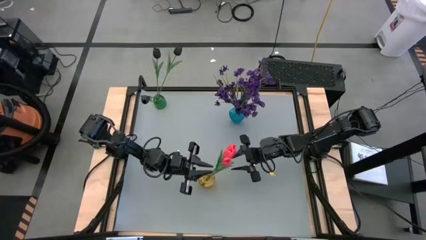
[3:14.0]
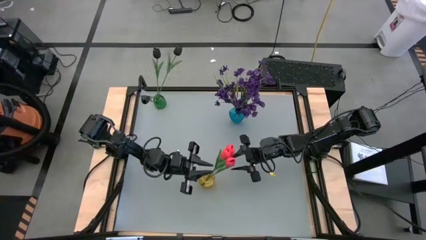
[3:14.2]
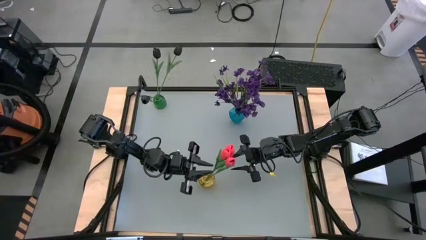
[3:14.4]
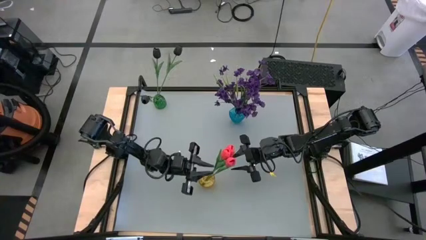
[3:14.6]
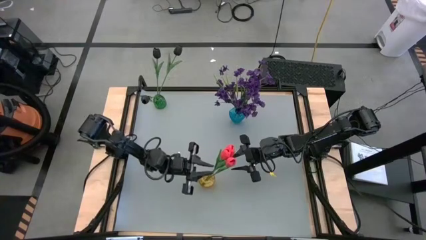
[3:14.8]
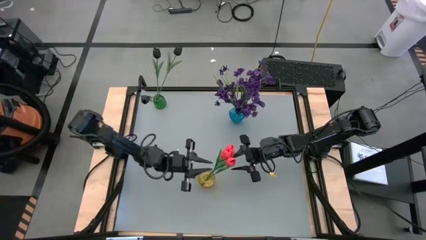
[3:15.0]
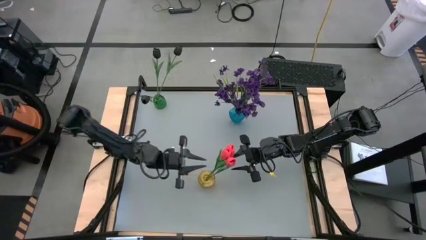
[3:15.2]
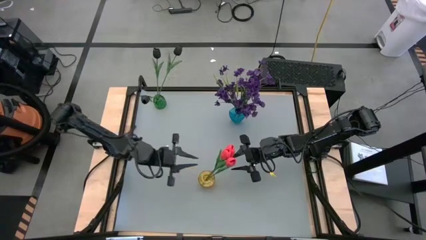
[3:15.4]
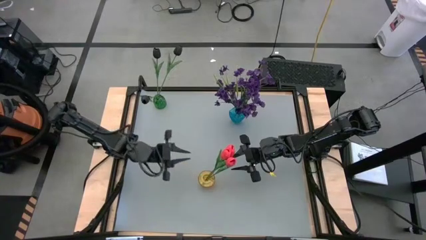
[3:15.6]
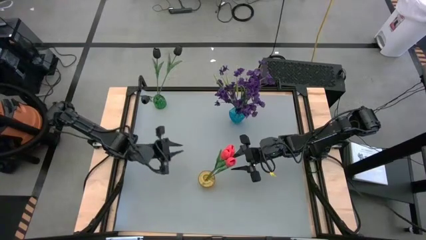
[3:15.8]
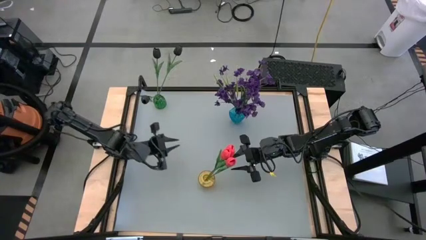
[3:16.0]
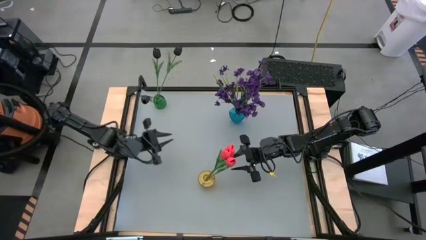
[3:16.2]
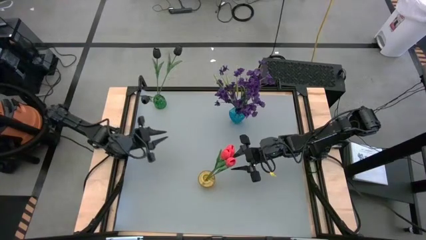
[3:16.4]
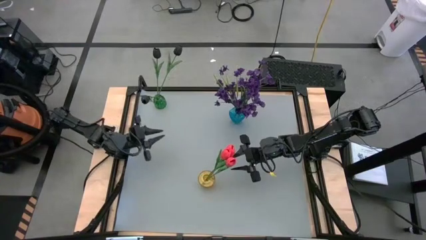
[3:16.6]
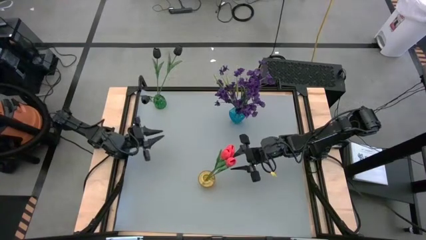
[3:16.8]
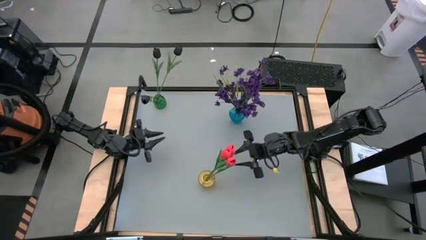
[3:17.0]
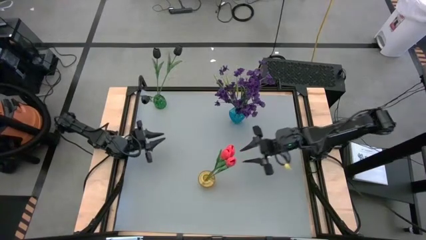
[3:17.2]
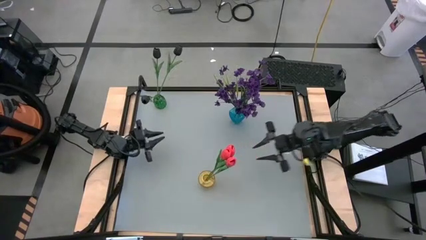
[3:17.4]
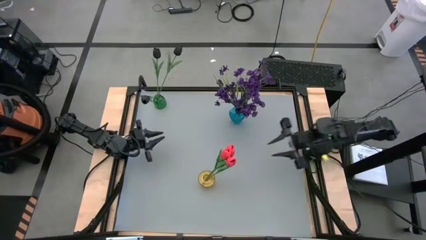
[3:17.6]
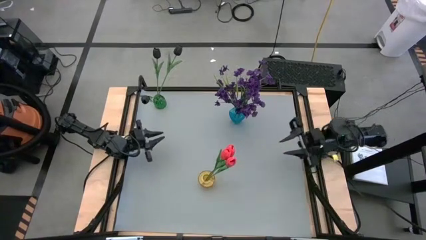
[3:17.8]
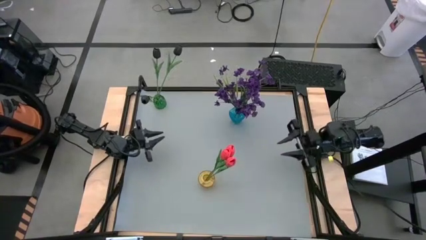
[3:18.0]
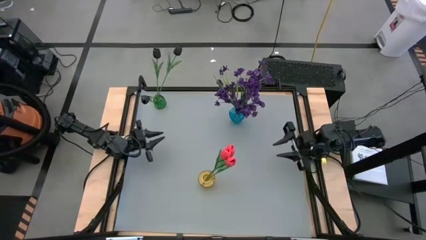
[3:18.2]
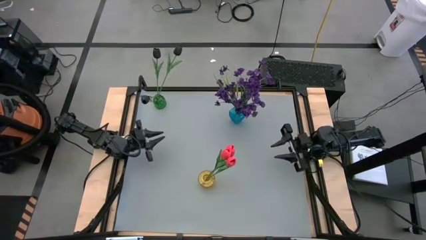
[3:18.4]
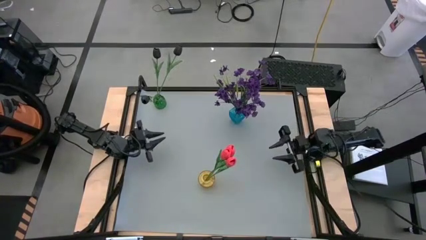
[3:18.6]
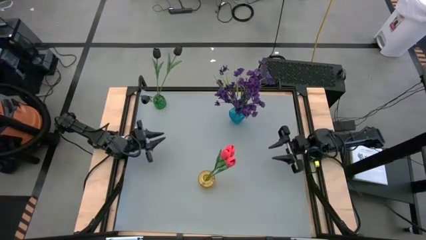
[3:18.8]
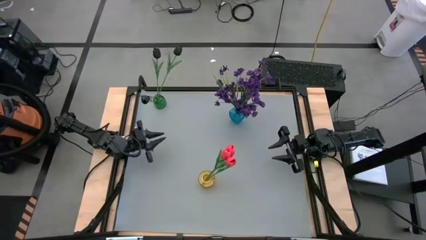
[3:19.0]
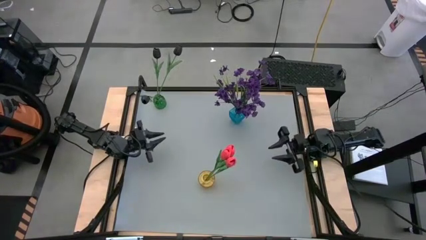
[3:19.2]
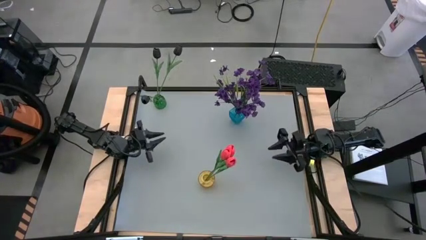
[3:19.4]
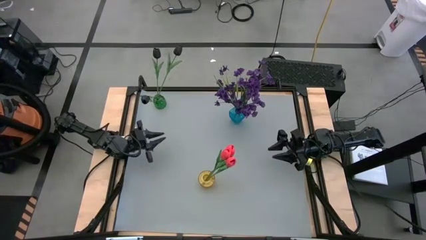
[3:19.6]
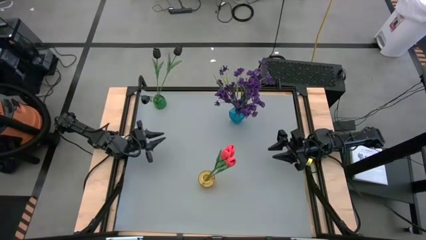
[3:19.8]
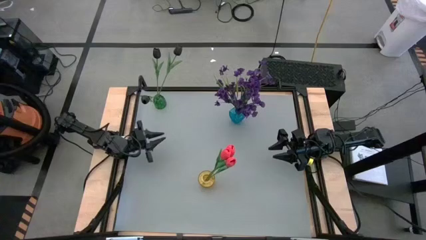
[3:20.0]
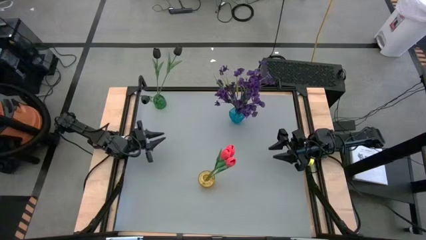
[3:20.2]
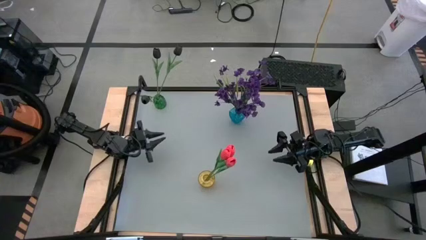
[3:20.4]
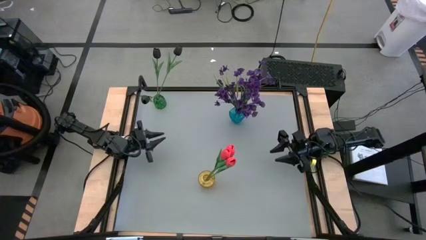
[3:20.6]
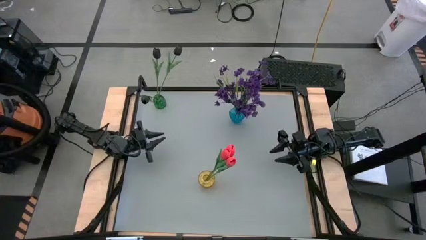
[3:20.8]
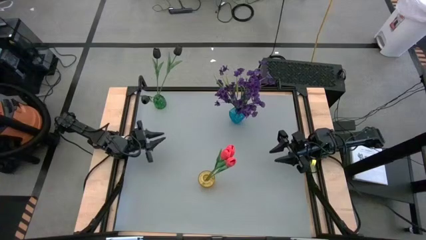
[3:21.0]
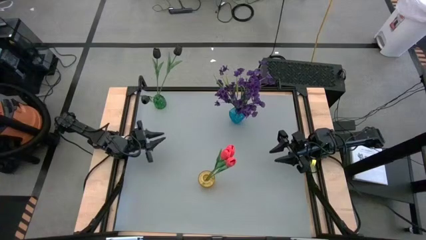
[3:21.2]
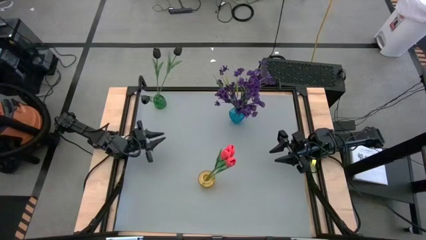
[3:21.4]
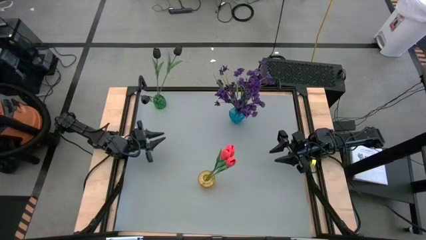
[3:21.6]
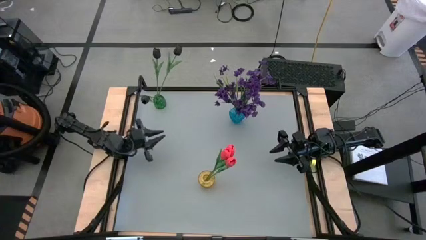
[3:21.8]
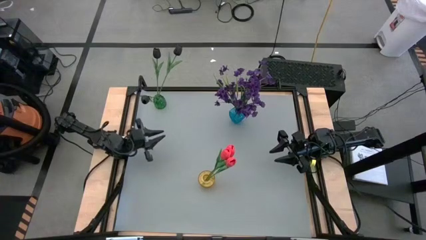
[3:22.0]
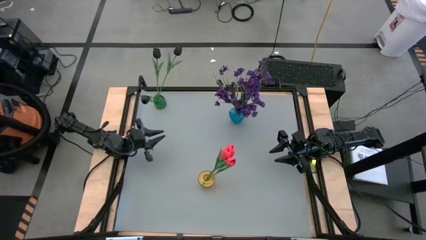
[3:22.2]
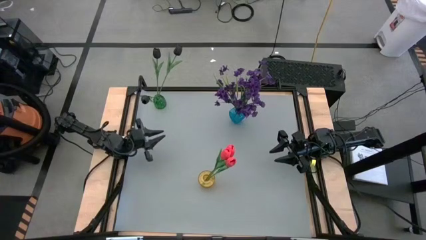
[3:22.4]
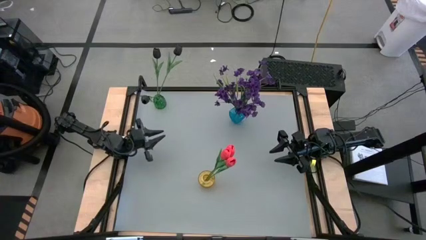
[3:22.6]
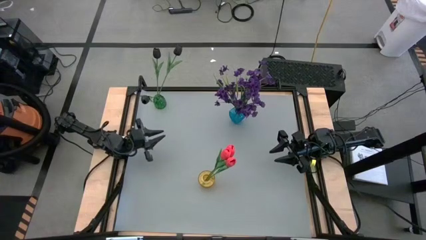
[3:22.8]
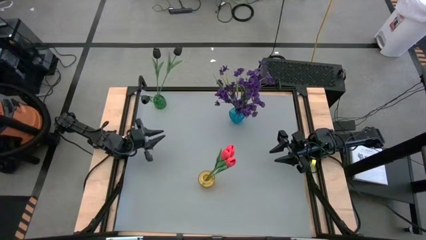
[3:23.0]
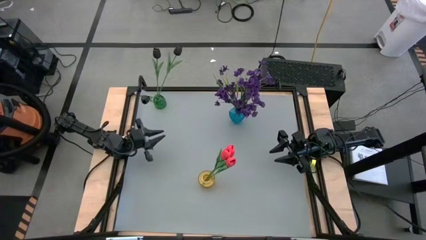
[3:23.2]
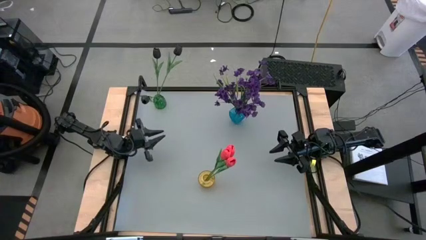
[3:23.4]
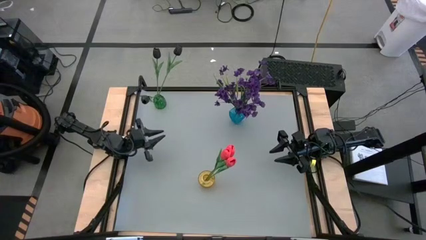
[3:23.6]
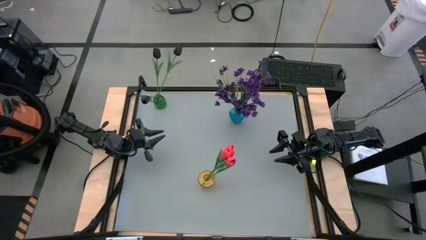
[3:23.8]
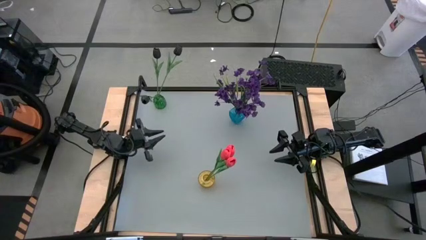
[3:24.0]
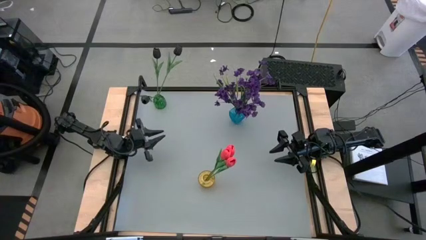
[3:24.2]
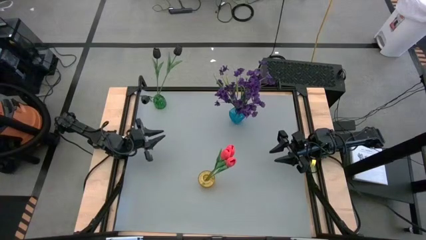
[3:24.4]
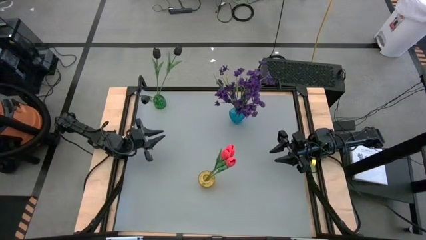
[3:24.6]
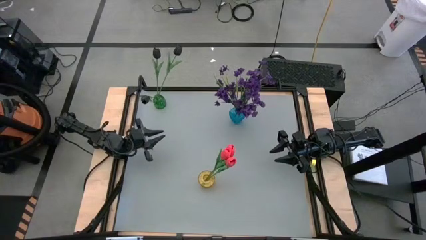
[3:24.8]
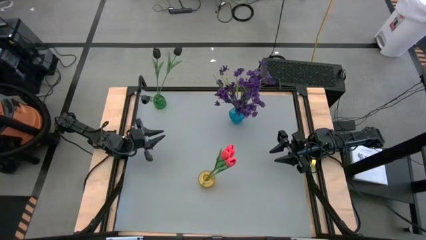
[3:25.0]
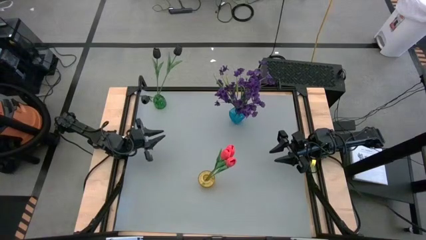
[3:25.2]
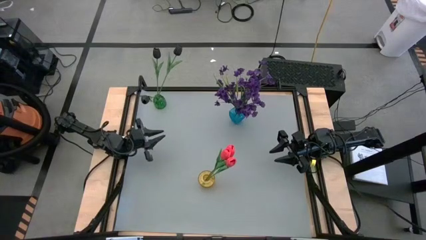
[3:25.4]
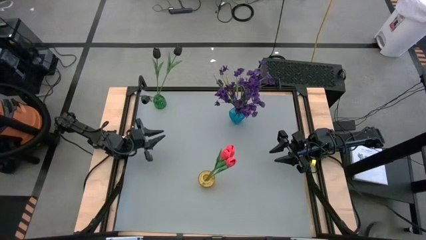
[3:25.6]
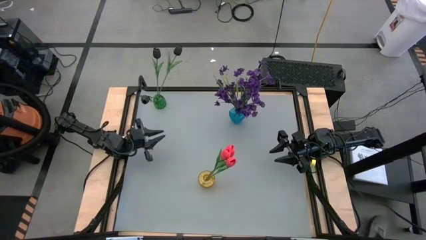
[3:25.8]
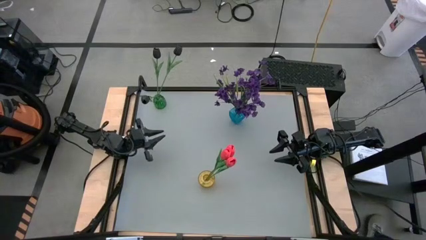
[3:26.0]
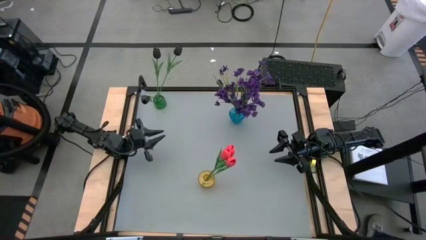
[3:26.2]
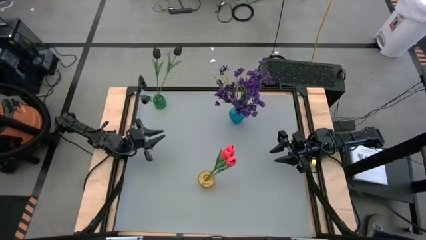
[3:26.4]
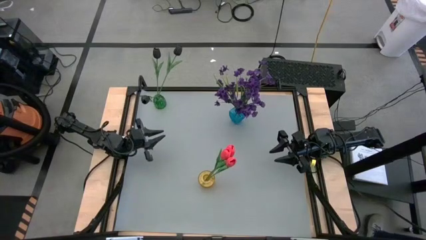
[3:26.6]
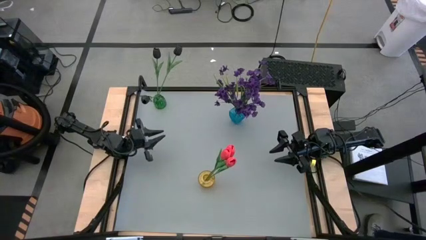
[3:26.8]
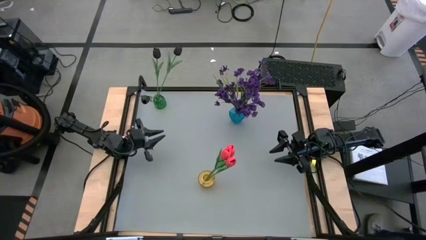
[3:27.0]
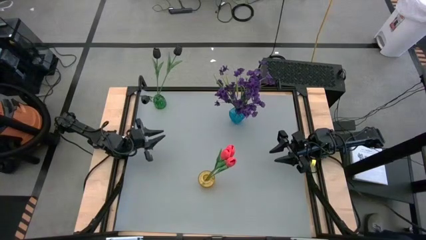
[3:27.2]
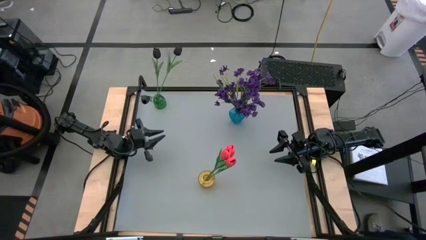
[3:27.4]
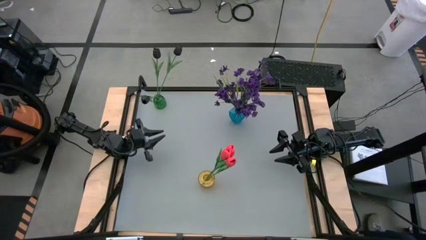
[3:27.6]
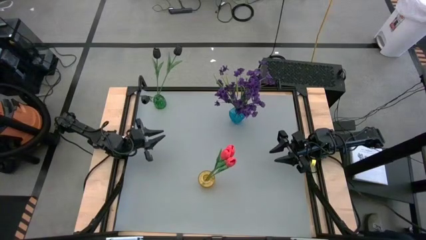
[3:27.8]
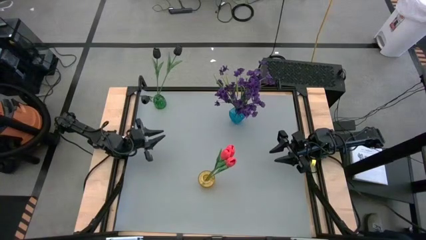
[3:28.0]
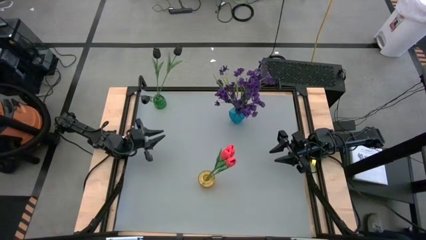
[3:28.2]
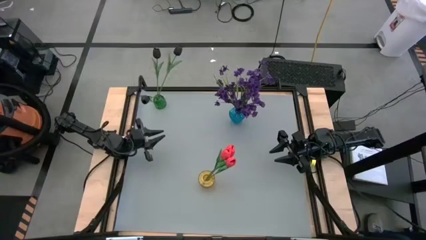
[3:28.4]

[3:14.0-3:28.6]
Task: Sort flowers into vase by color
Return to Home Position

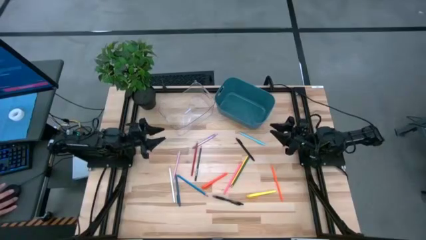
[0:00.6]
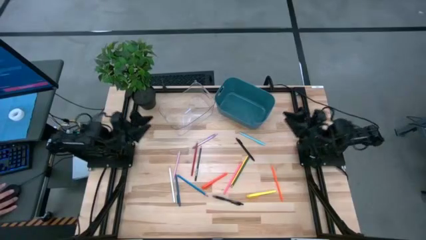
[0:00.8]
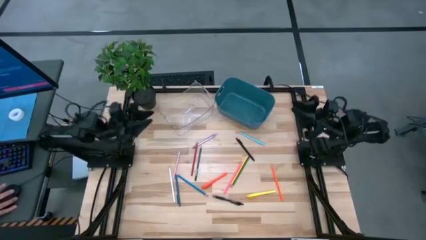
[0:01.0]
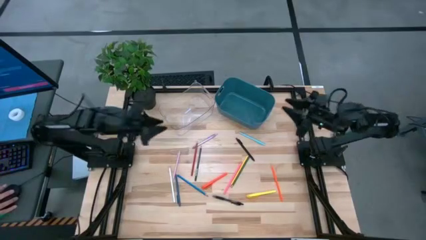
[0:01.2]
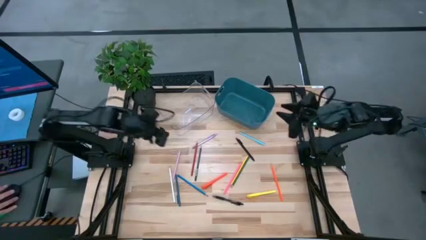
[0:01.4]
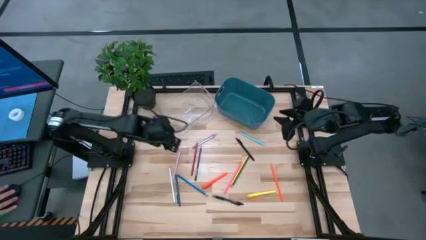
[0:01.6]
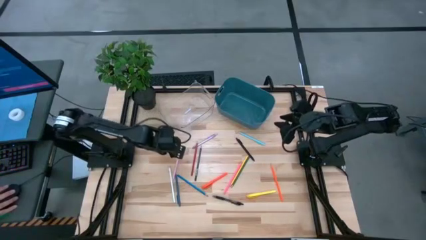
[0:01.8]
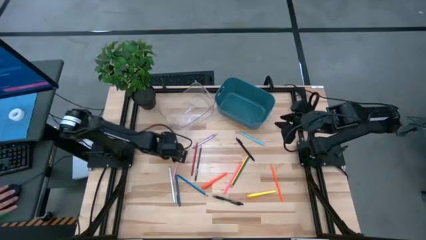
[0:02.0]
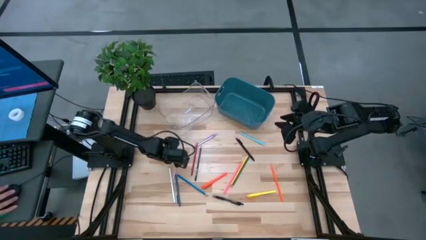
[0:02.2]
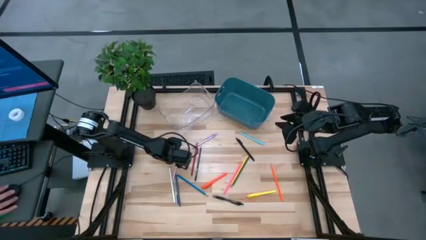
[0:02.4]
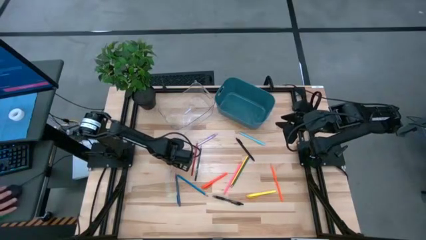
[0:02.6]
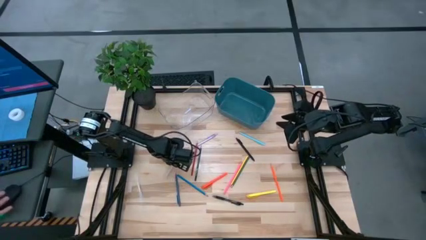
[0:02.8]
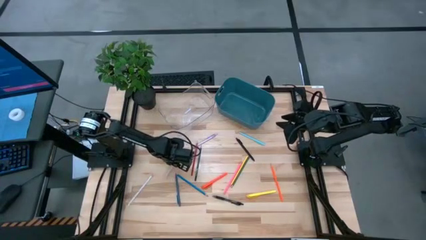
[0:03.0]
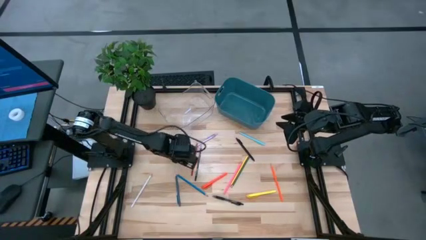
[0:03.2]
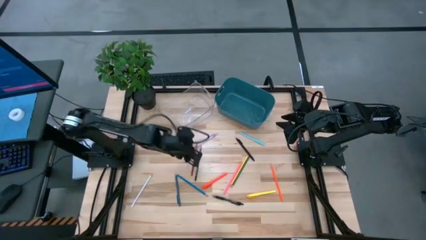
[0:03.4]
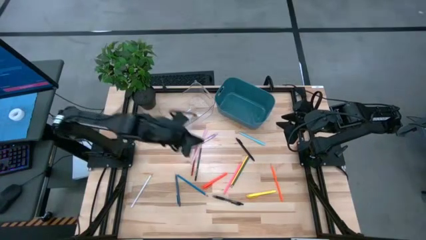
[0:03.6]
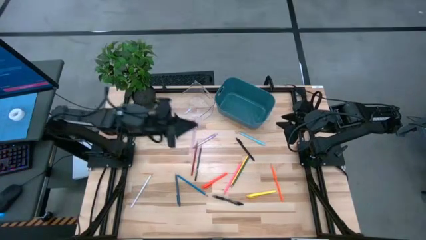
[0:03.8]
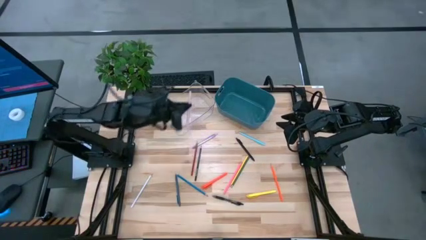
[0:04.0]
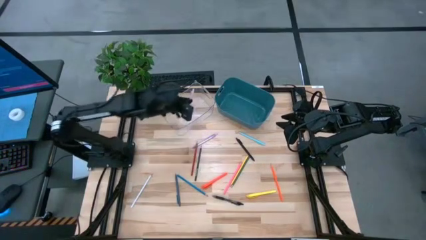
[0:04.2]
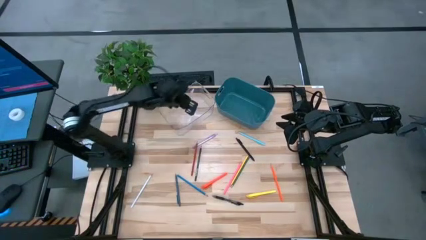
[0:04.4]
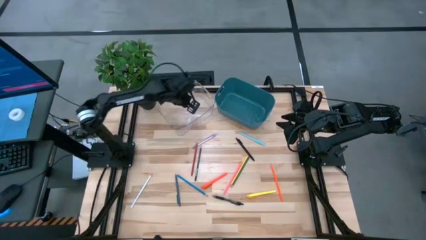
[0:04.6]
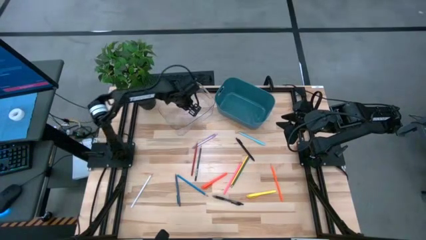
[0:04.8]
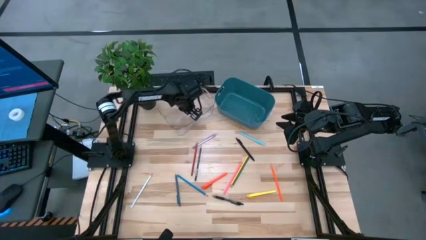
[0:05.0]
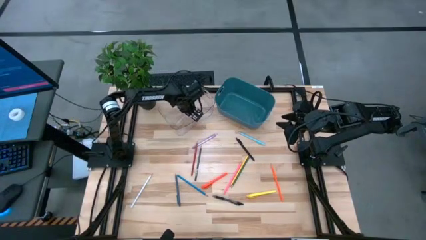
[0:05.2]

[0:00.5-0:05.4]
Task: Sort pens & pencils
Put the light pink pen into the transparent bin
